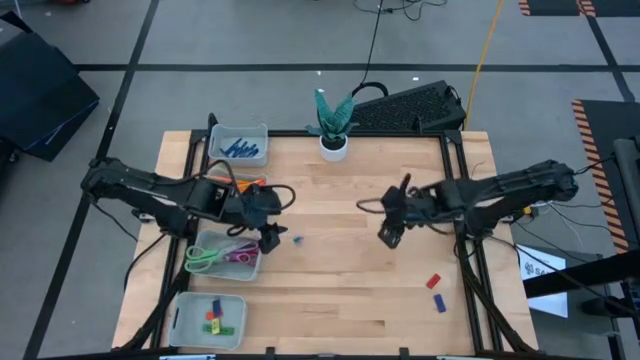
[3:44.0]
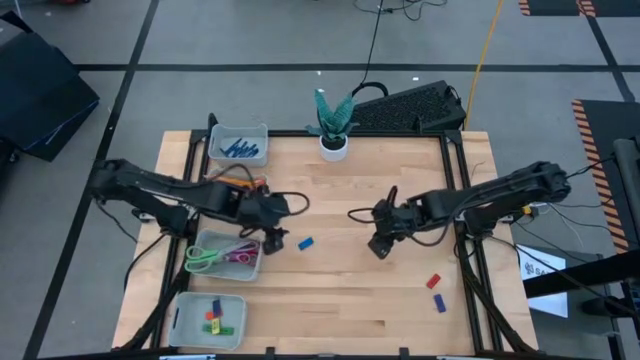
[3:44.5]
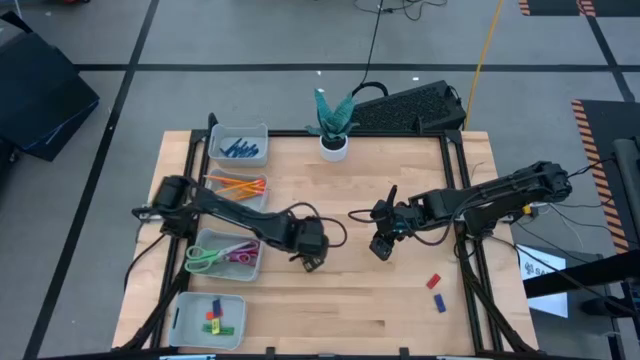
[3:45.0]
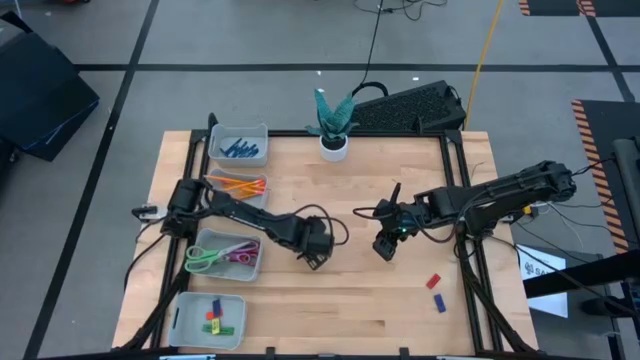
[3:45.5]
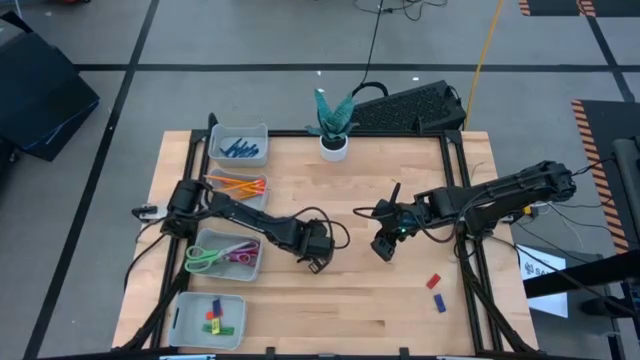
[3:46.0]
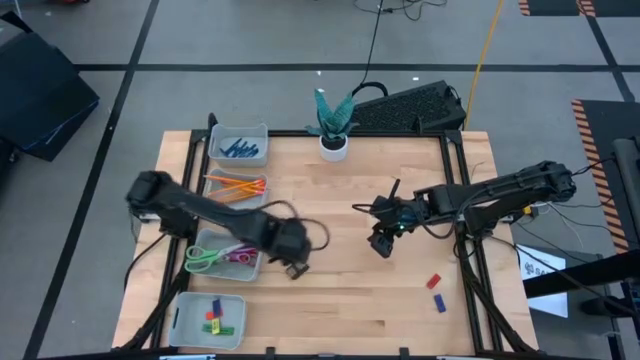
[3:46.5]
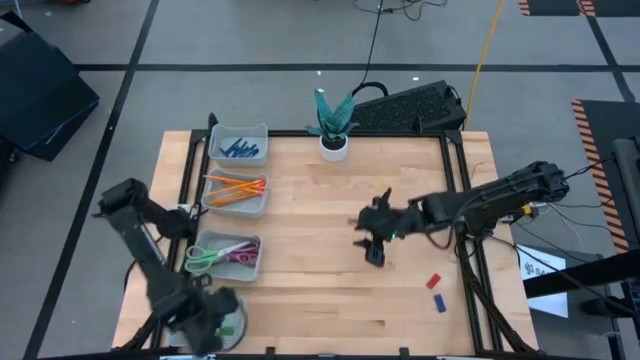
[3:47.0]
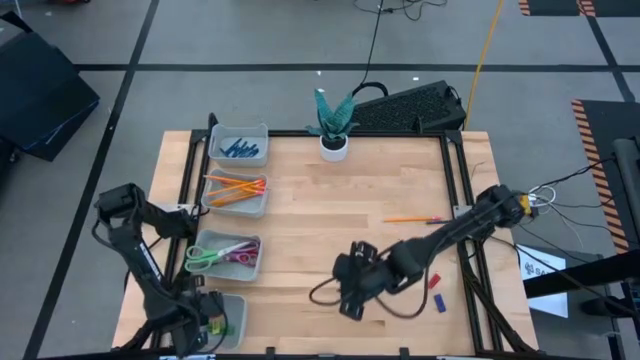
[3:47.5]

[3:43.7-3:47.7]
Task: Sort crayons/erasers/pens/pencils in bins
Put the blue eraser into the bottom

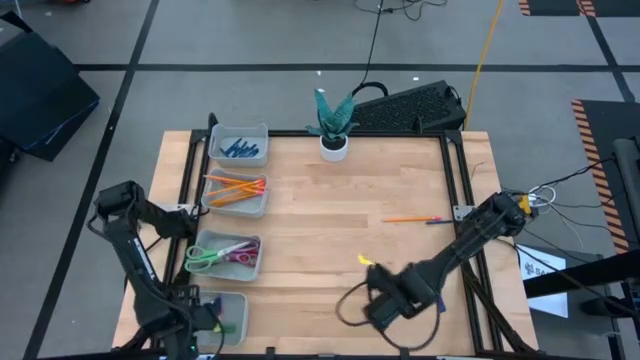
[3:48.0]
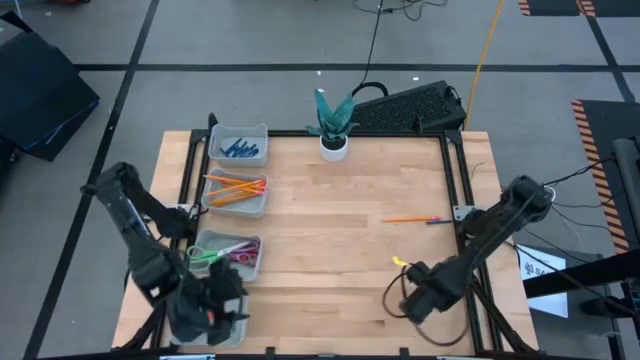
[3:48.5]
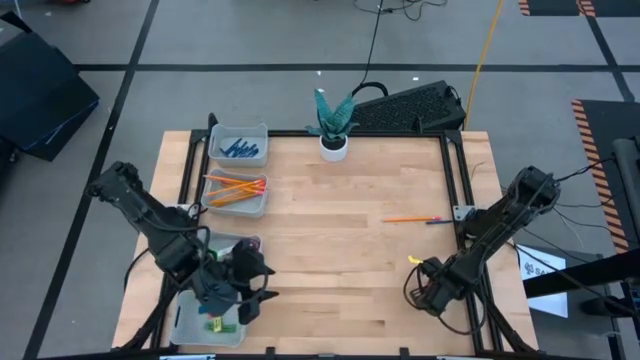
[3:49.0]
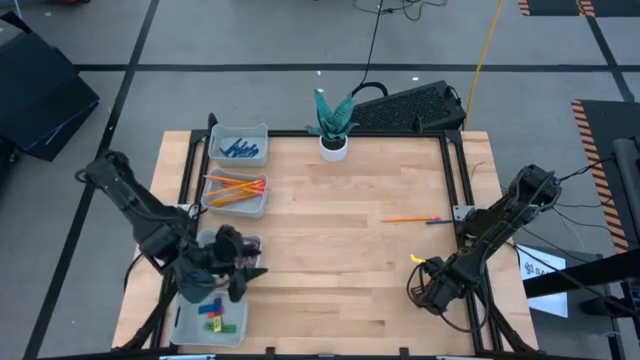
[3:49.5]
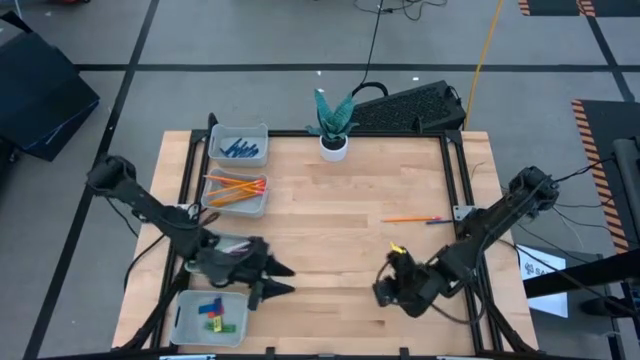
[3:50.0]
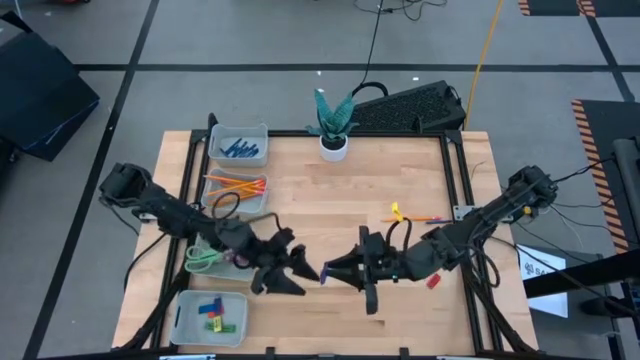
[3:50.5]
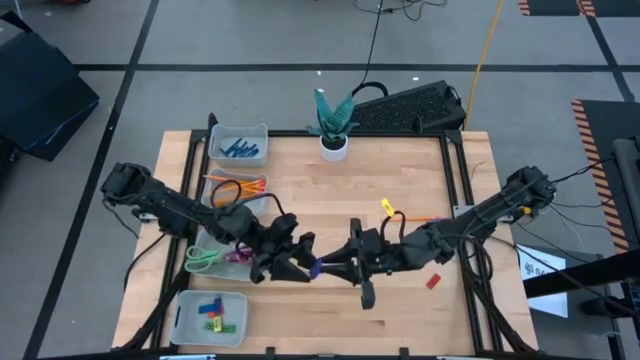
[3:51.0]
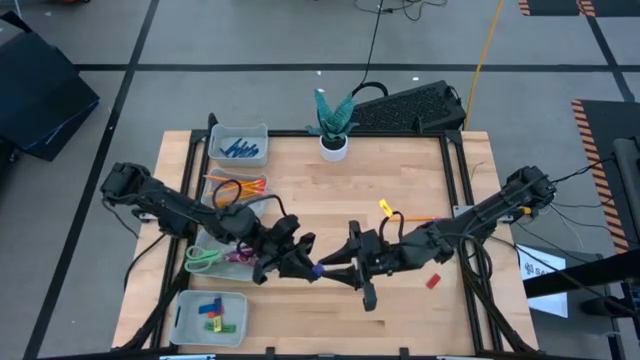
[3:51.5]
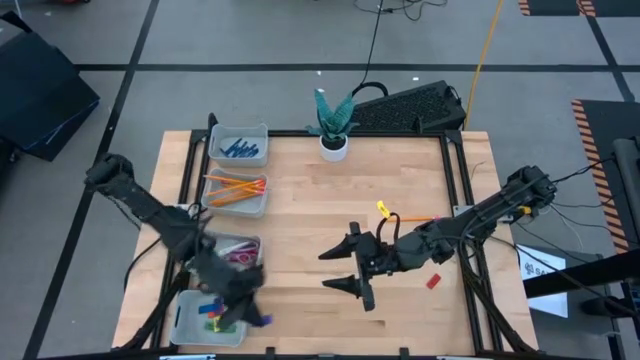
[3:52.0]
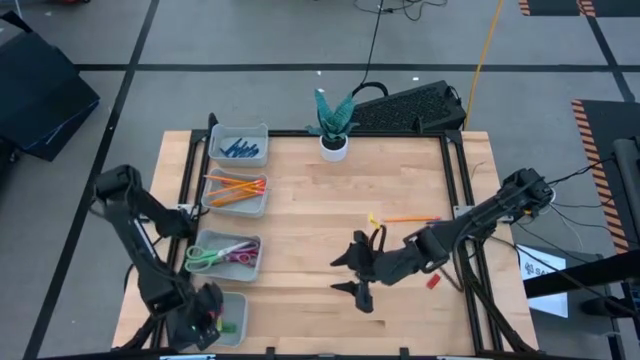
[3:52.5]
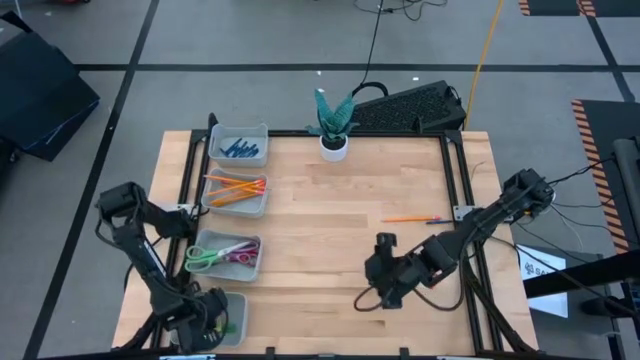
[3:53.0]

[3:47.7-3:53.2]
Put the purple eraser into the bottom

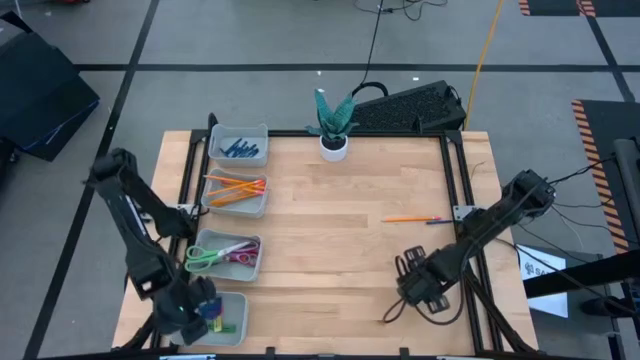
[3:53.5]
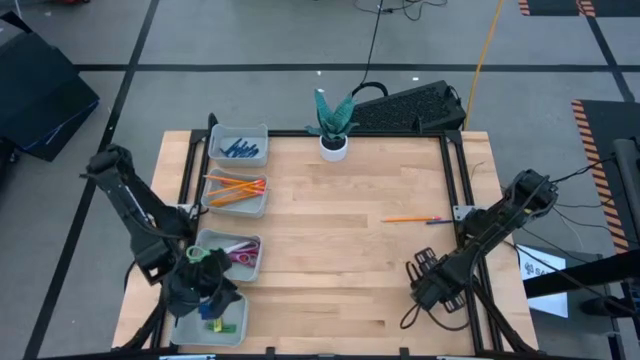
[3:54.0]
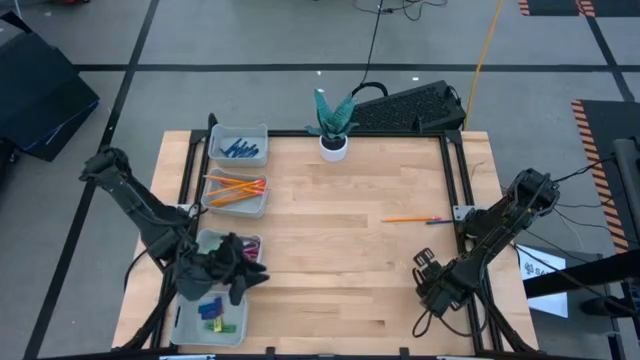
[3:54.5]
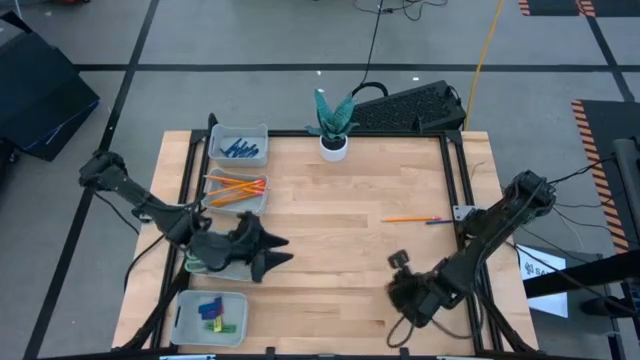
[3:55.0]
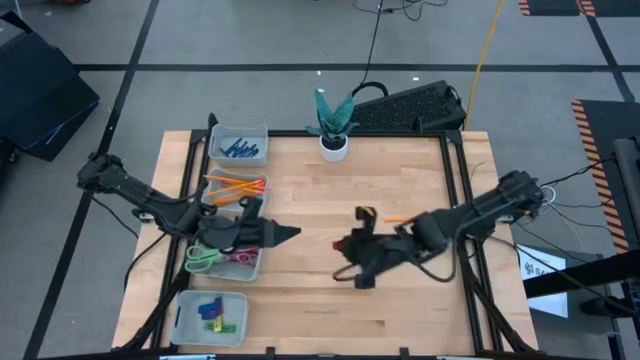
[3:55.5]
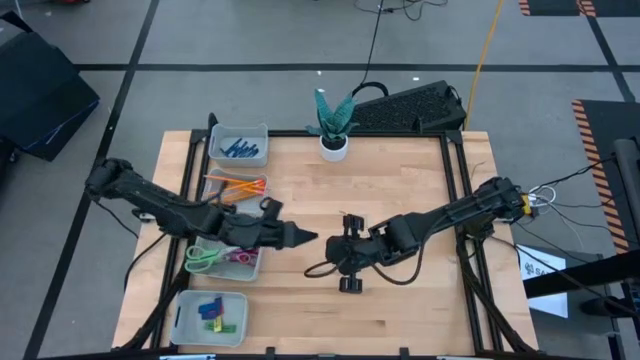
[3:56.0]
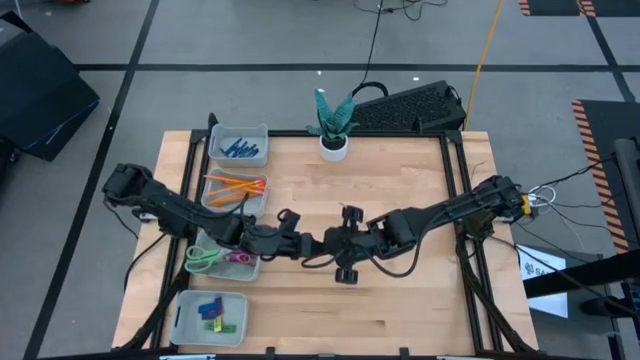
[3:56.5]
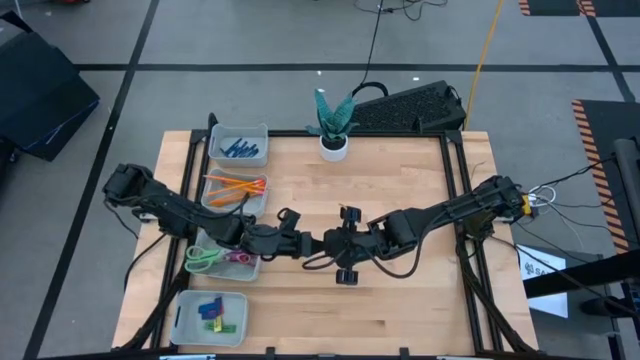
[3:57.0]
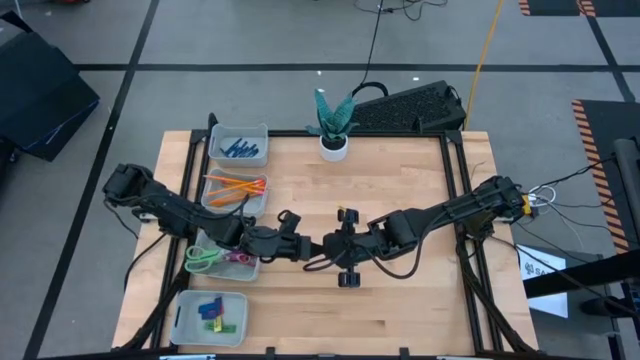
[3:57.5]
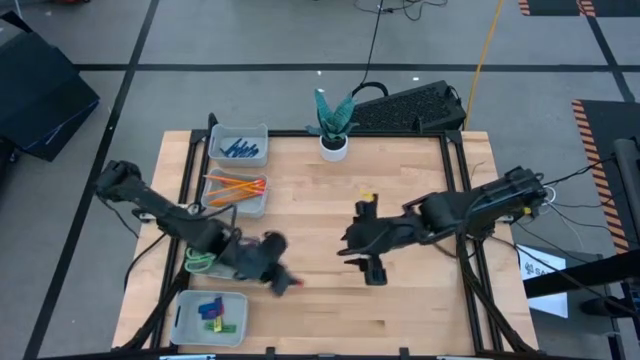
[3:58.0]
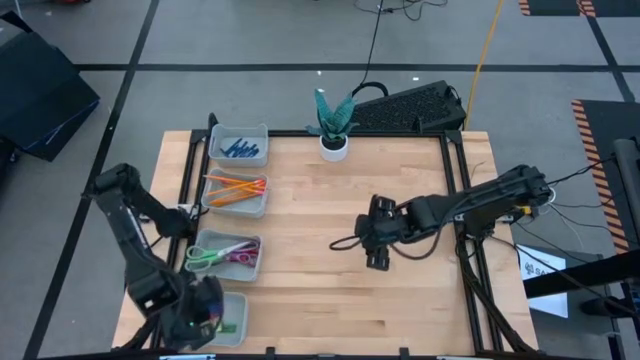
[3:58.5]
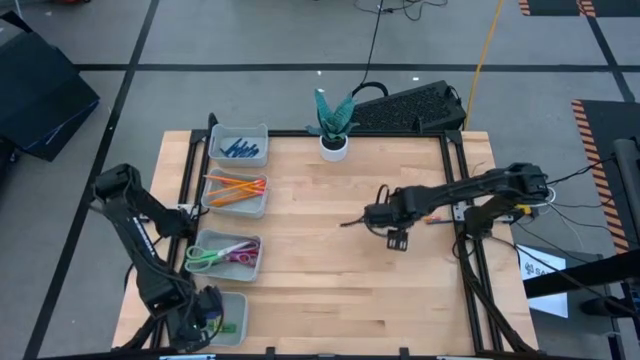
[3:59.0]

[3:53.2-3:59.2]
Put the red eraser into the bottom

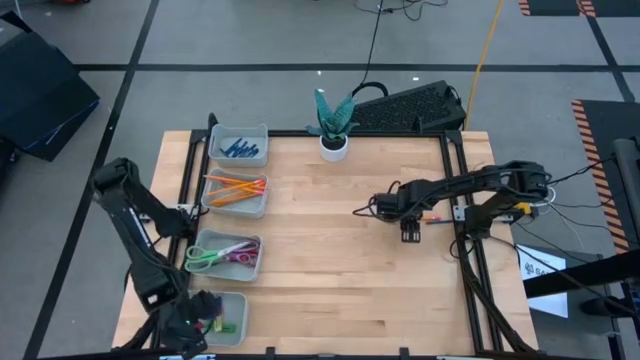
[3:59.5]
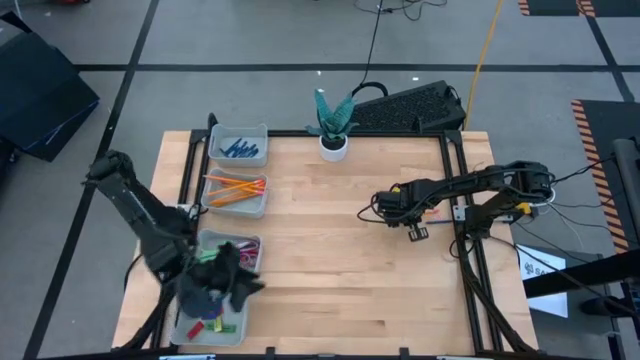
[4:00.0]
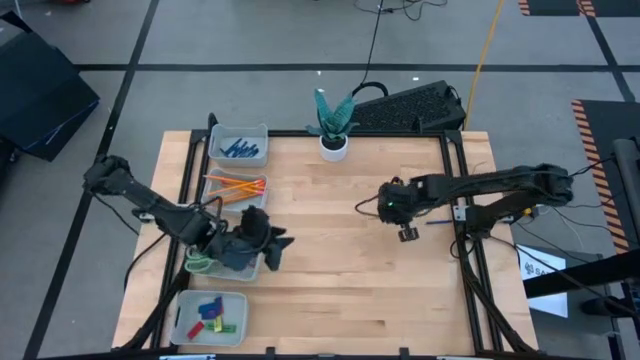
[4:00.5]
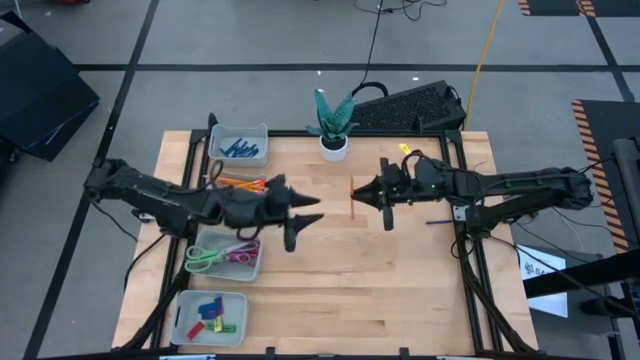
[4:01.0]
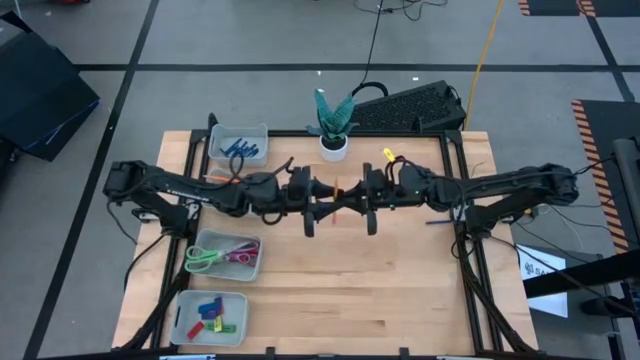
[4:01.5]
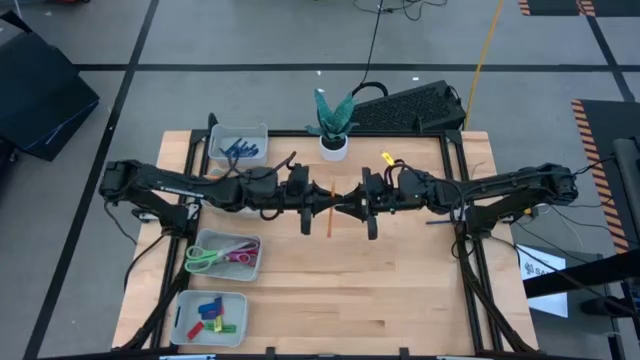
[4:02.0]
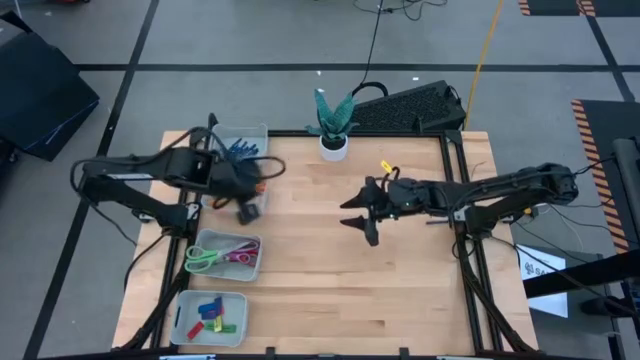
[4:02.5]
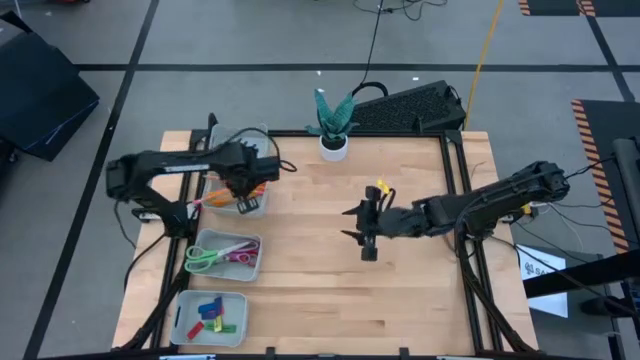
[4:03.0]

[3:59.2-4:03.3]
Put the orange pencil into the middle top gray bin
